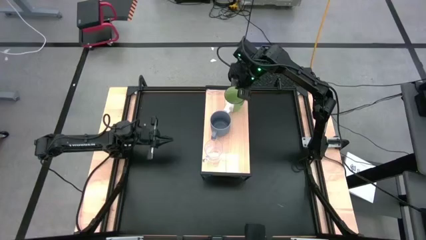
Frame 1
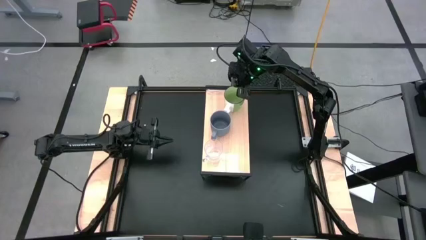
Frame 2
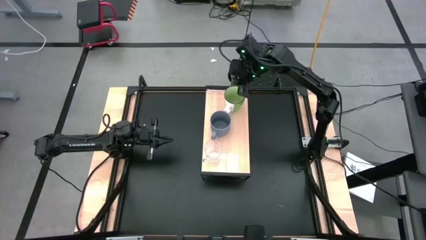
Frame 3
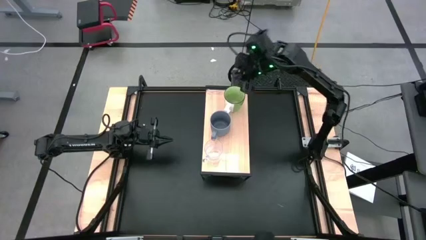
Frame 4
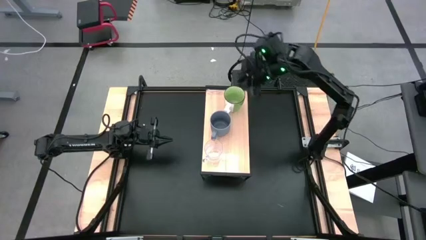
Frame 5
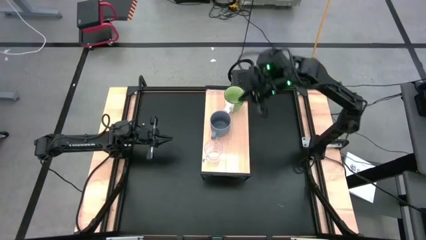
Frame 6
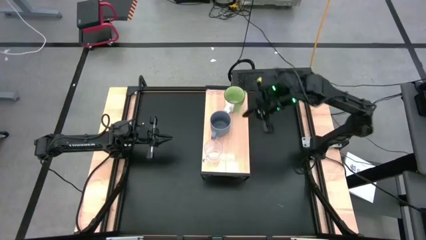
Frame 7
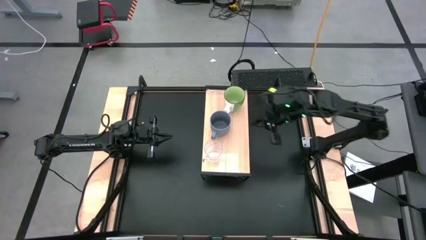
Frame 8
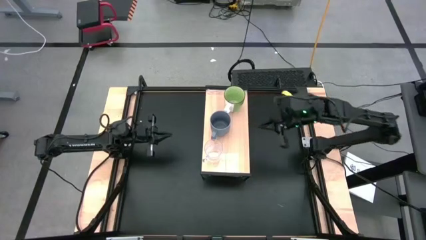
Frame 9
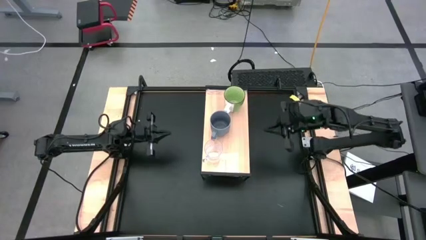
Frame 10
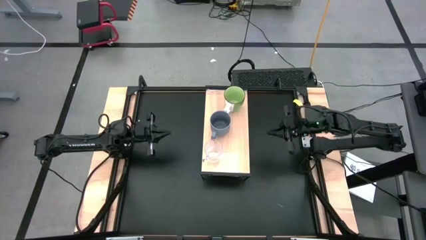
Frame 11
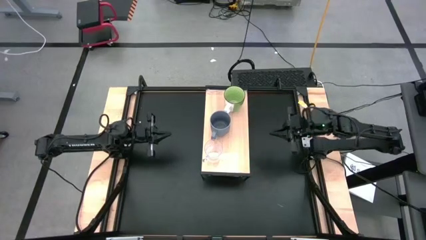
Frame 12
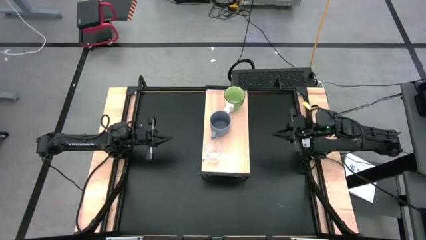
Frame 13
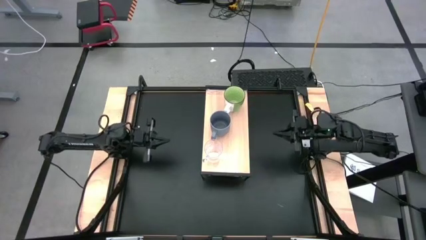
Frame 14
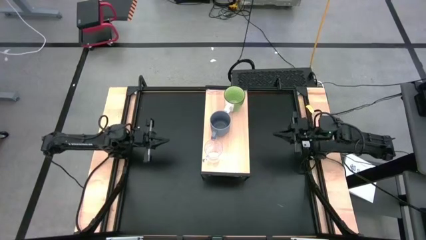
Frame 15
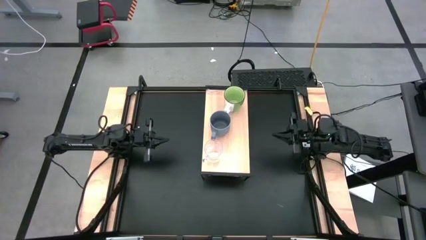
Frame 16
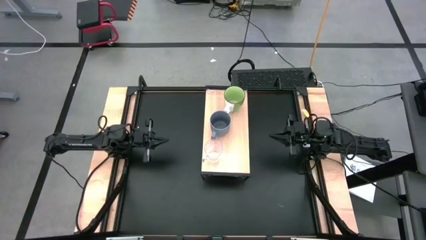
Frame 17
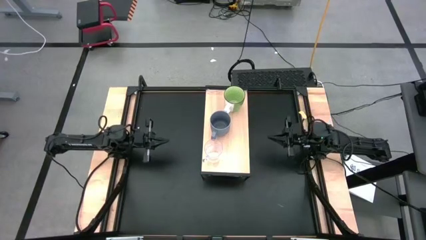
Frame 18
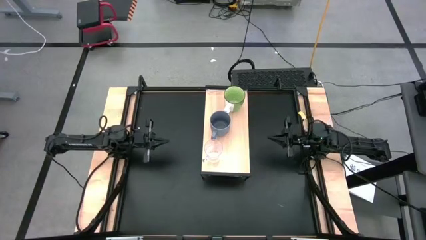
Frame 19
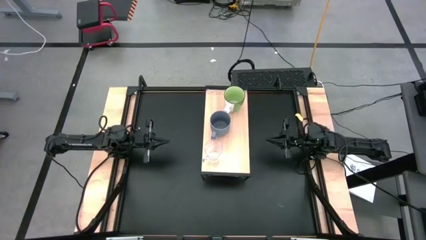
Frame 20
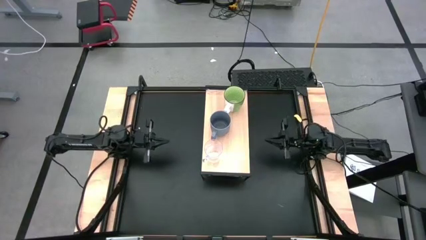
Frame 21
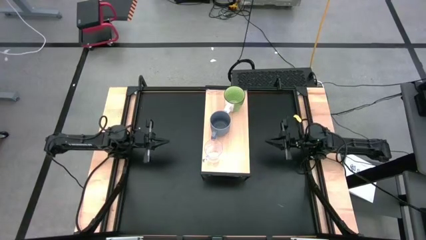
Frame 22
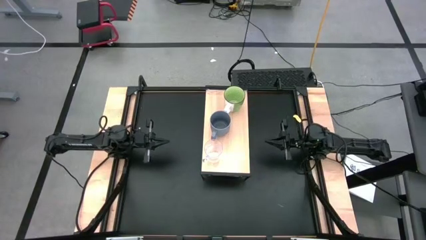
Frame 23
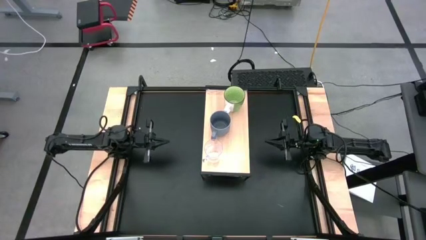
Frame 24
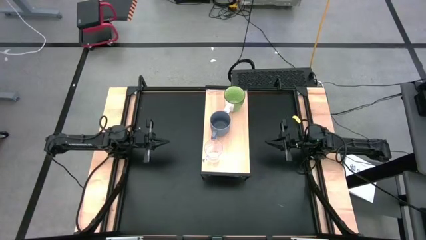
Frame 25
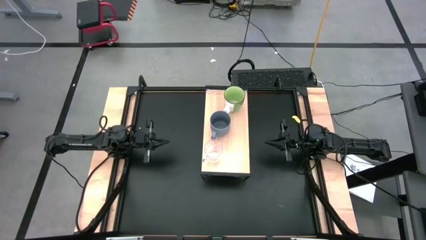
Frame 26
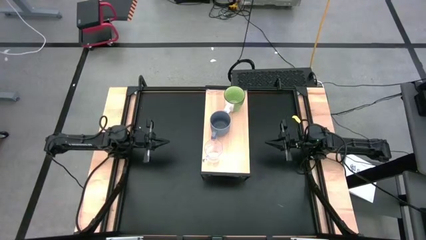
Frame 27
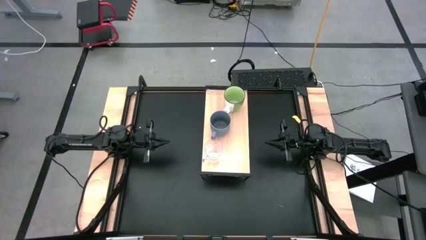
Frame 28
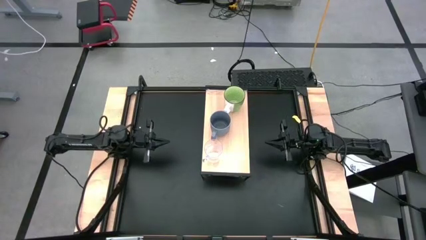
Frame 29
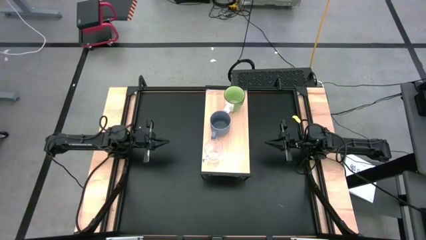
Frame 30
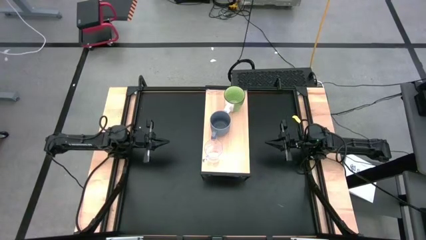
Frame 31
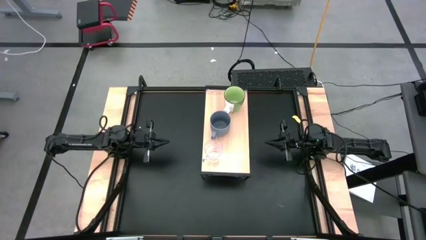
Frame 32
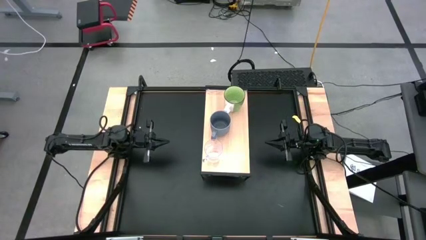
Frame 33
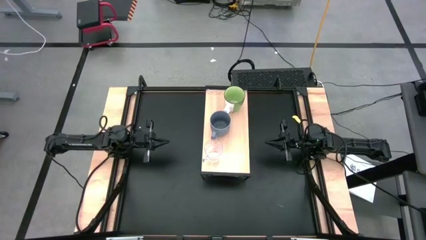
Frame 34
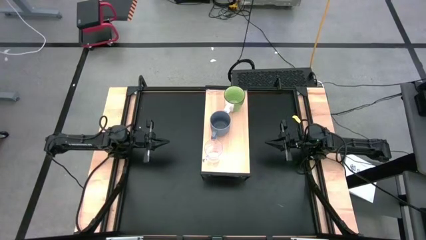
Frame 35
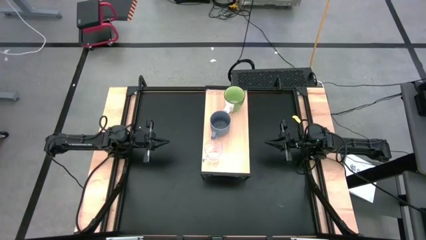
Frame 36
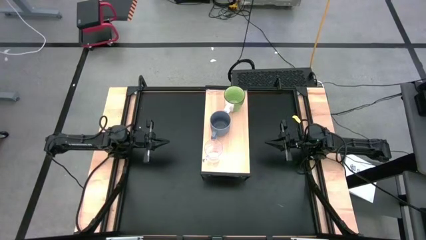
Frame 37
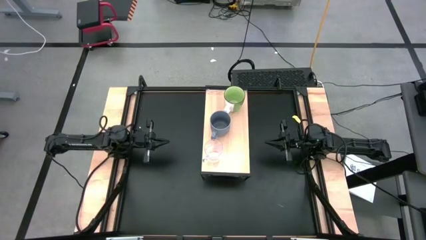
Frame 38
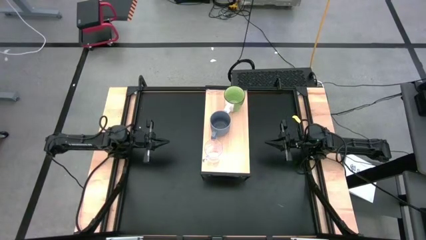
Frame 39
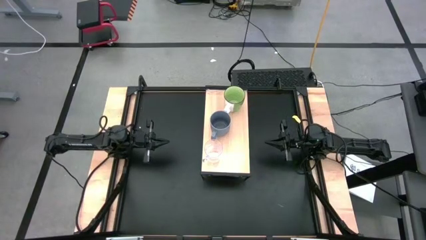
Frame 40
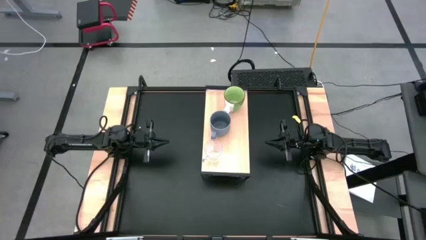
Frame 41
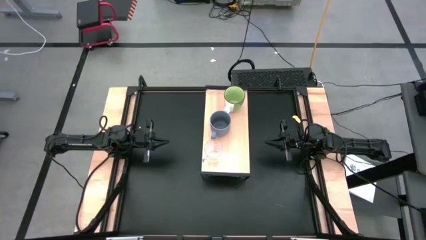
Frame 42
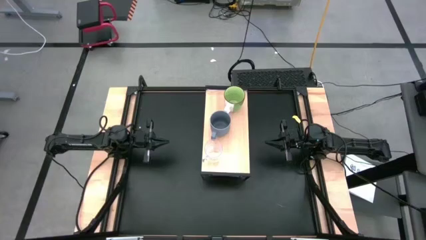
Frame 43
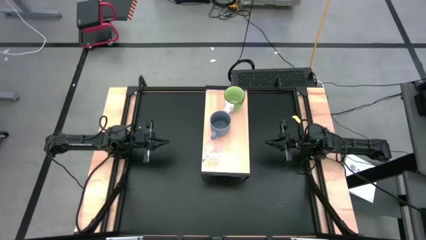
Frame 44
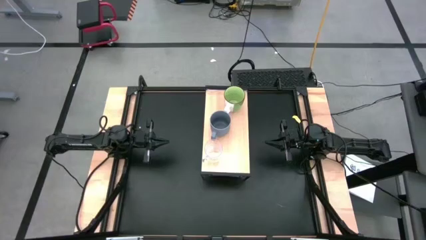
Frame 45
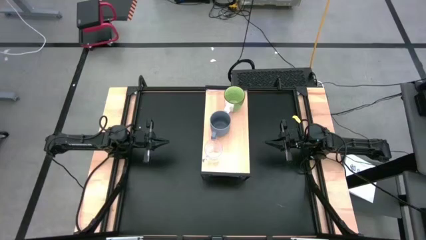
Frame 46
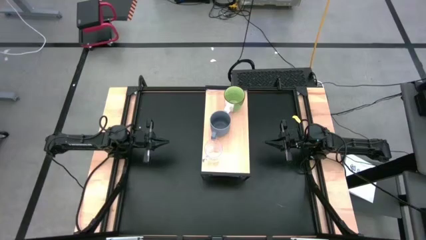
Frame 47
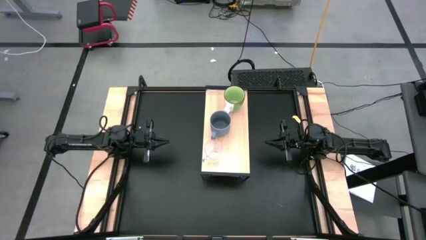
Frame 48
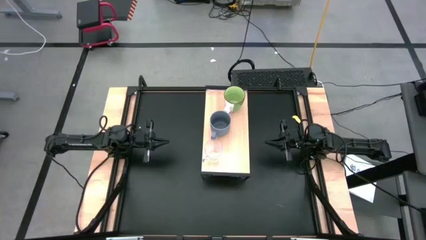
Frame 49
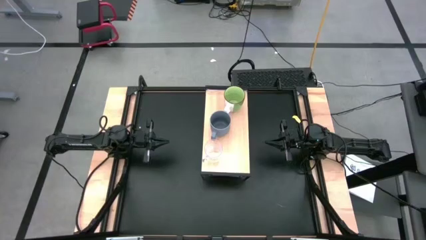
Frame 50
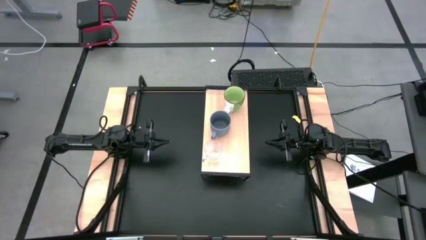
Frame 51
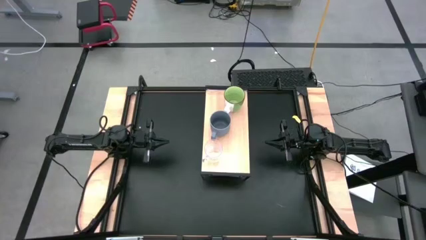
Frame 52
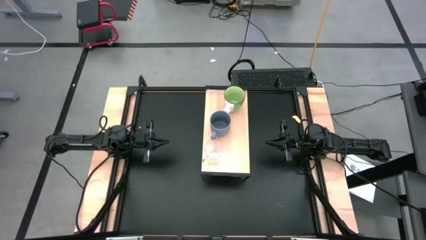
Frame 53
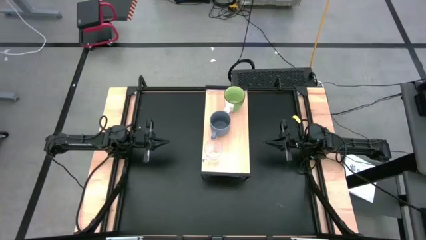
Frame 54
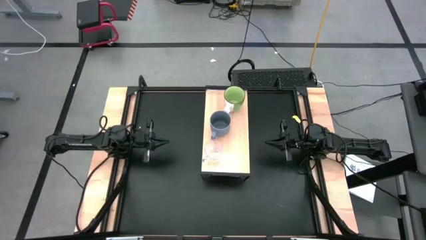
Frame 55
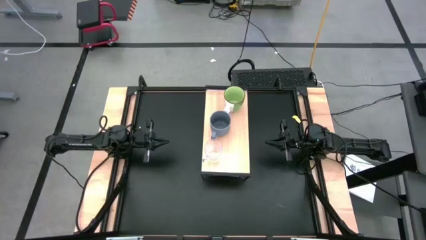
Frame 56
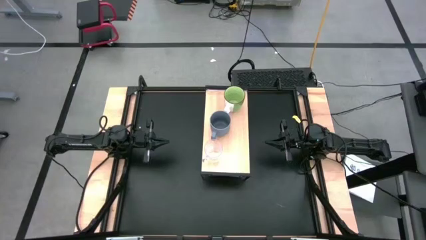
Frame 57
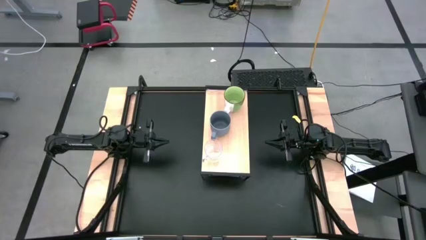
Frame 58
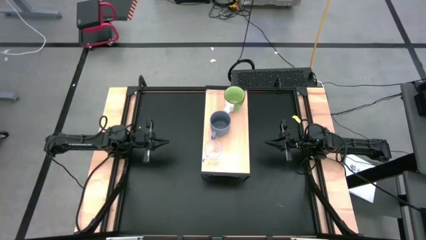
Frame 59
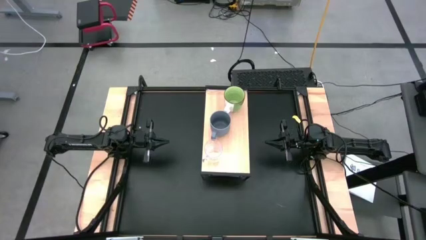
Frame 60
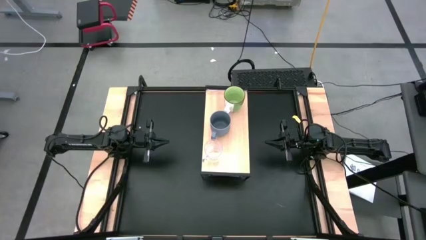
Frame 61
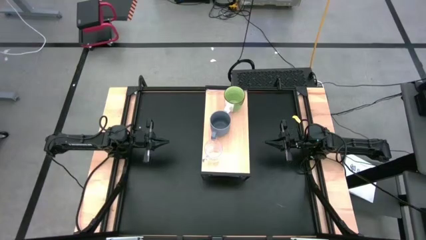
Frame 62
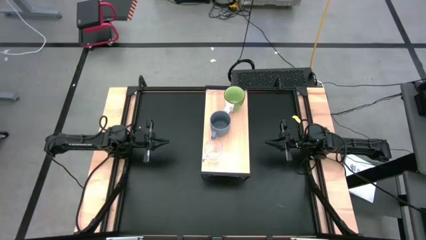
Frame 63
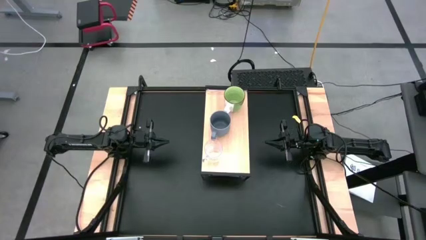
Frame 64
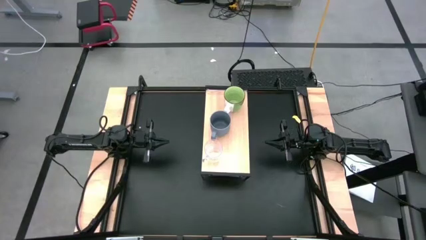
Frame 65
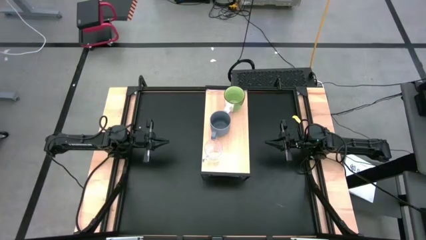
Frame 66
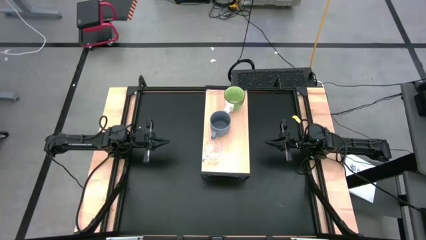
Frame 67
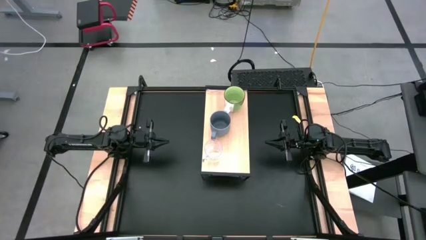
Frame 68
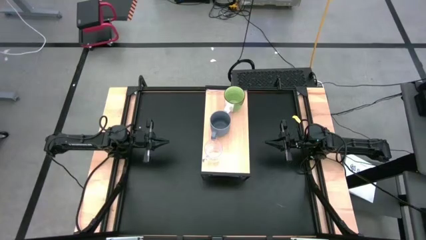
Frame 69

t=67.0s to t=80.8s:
Task: Stack small to large cups/mugs on shelf
Return to Home Position
